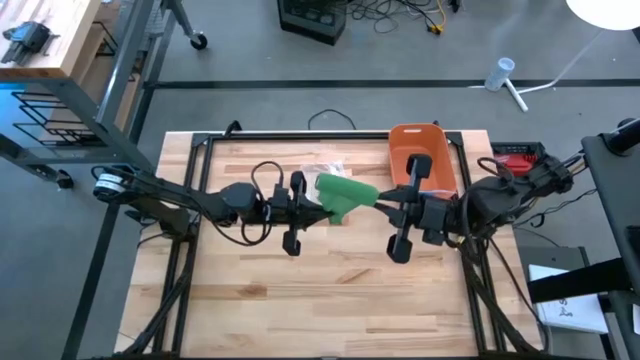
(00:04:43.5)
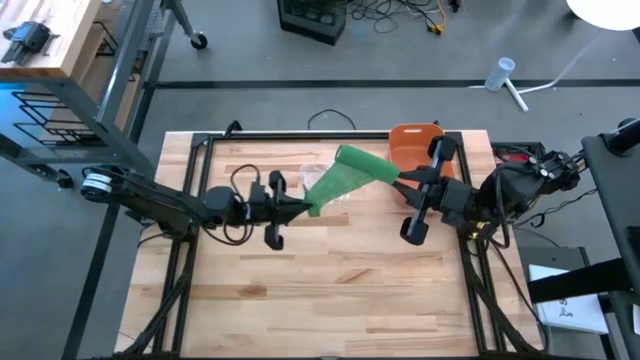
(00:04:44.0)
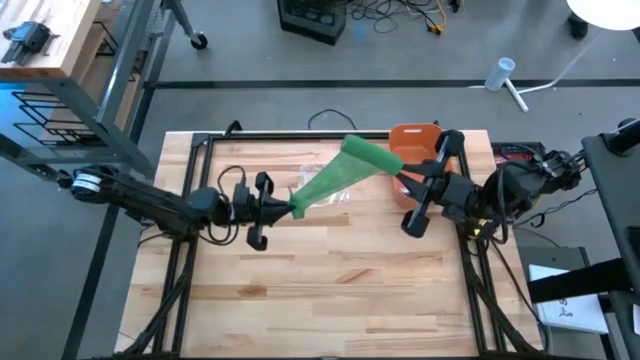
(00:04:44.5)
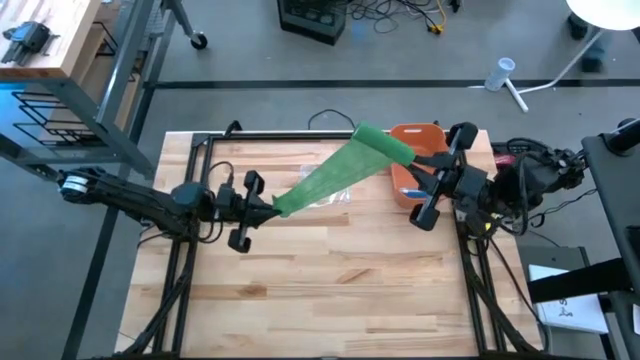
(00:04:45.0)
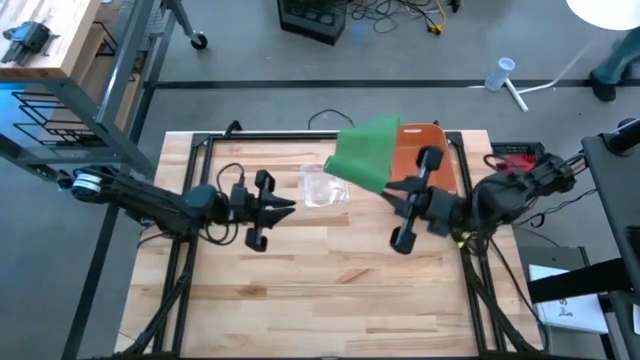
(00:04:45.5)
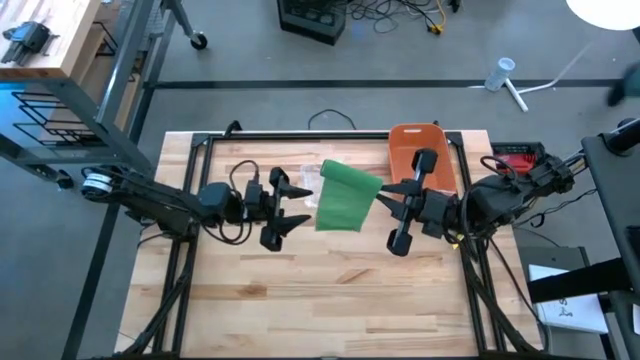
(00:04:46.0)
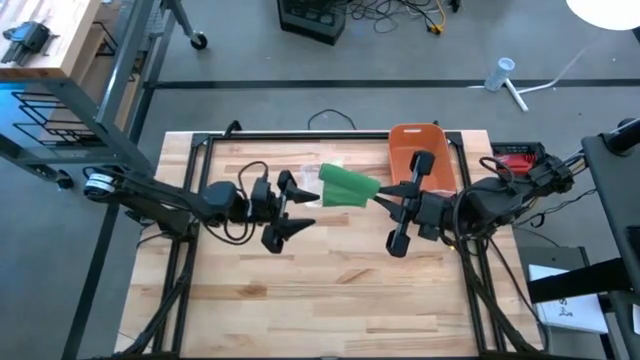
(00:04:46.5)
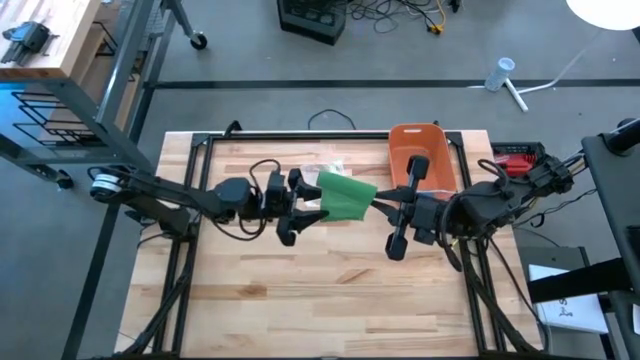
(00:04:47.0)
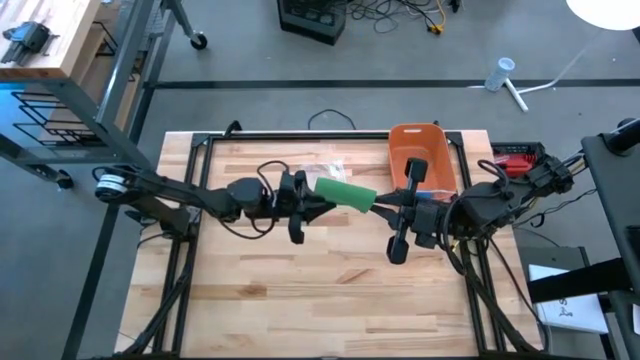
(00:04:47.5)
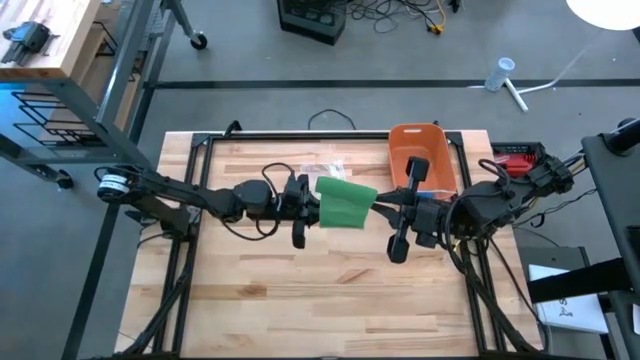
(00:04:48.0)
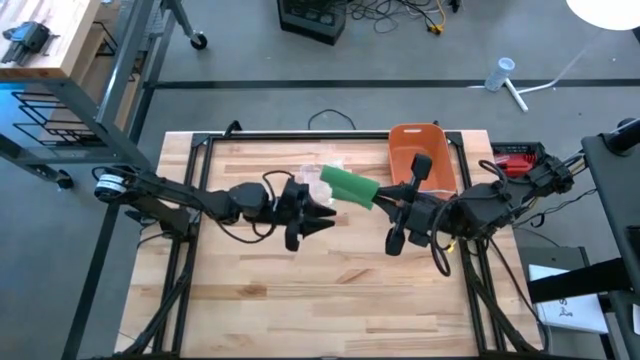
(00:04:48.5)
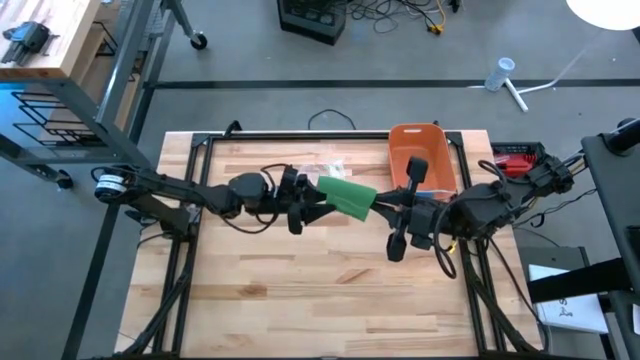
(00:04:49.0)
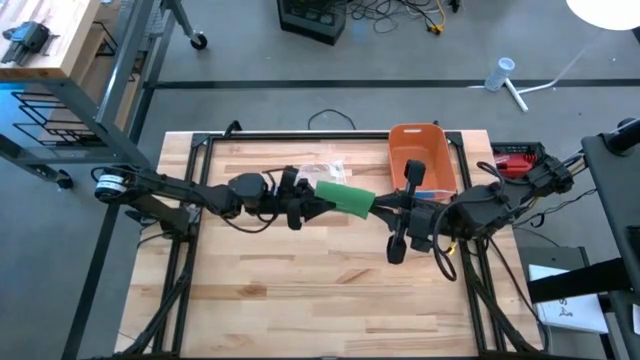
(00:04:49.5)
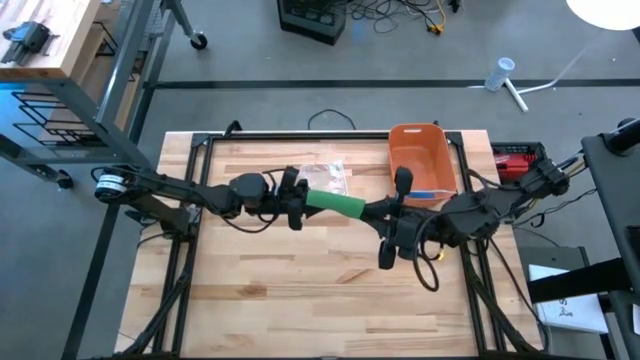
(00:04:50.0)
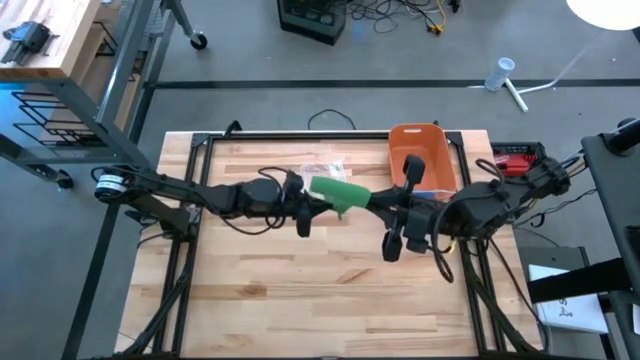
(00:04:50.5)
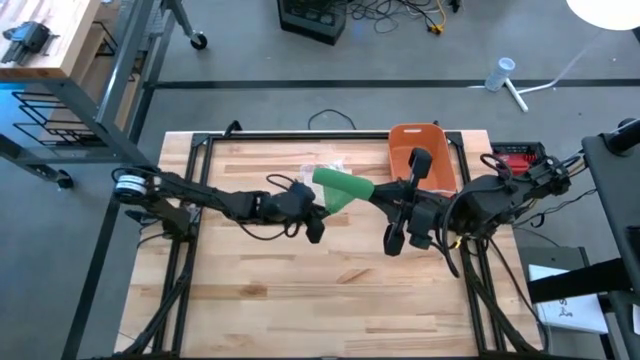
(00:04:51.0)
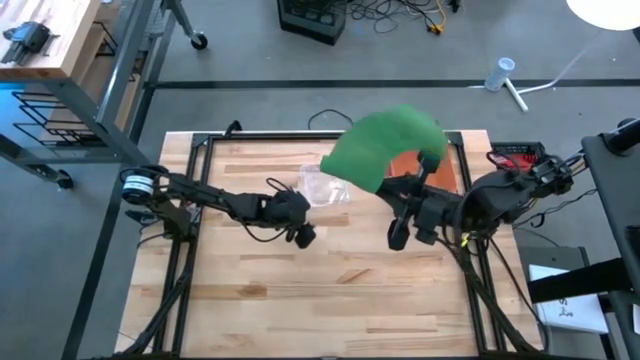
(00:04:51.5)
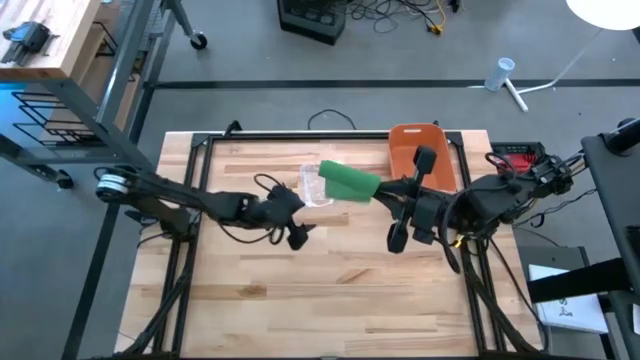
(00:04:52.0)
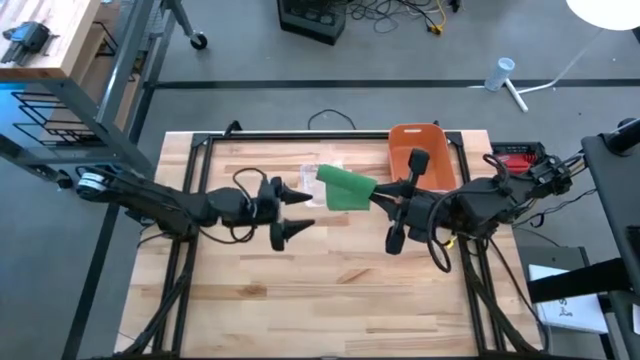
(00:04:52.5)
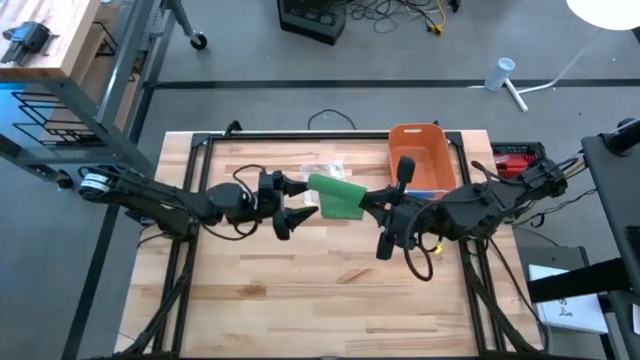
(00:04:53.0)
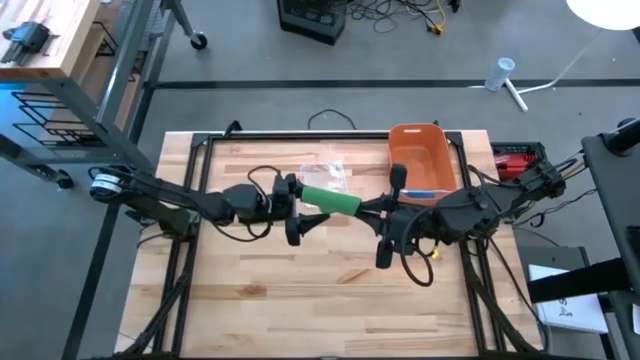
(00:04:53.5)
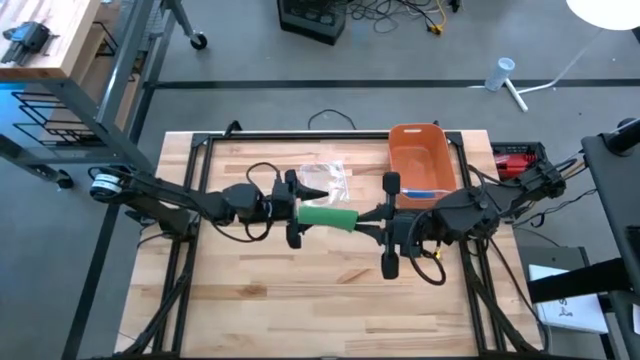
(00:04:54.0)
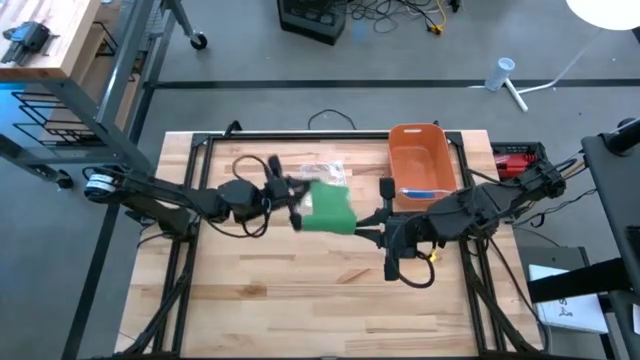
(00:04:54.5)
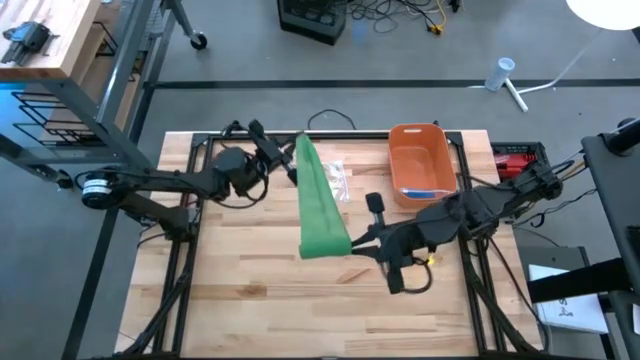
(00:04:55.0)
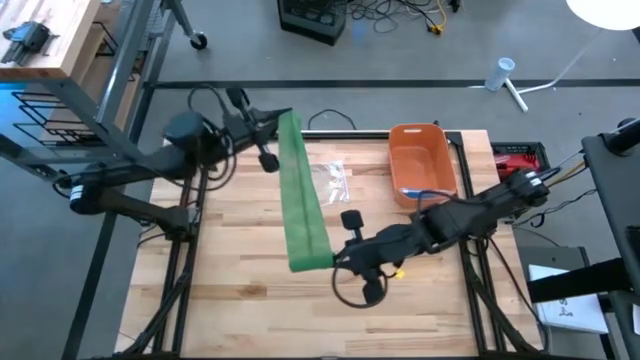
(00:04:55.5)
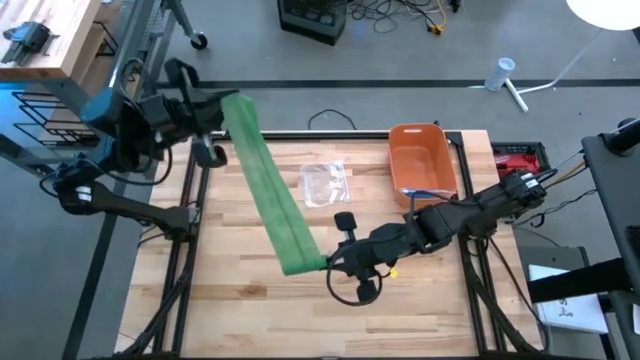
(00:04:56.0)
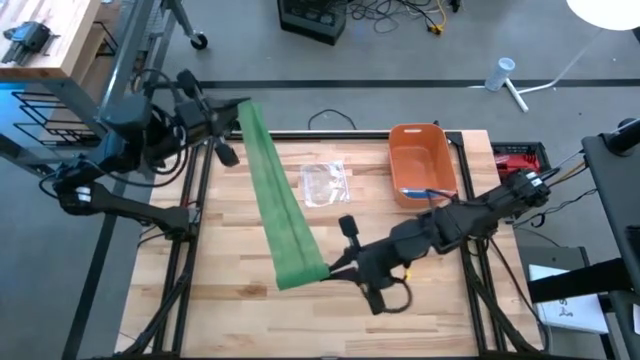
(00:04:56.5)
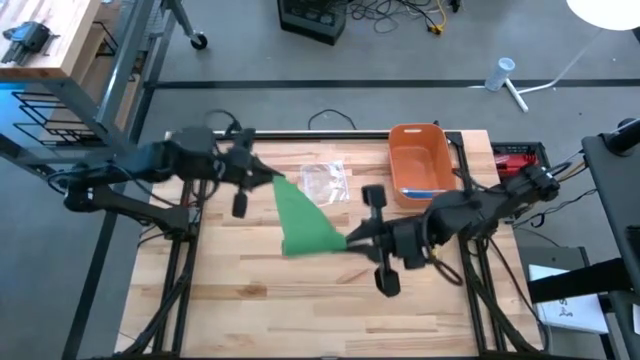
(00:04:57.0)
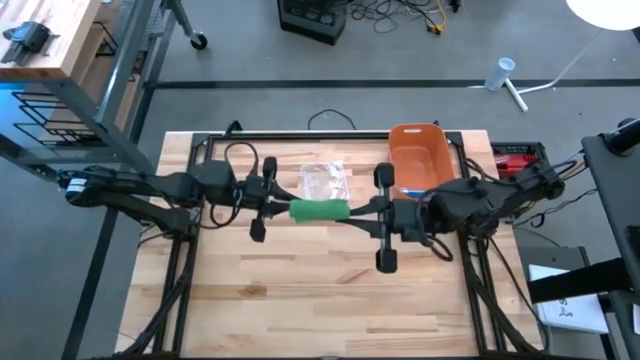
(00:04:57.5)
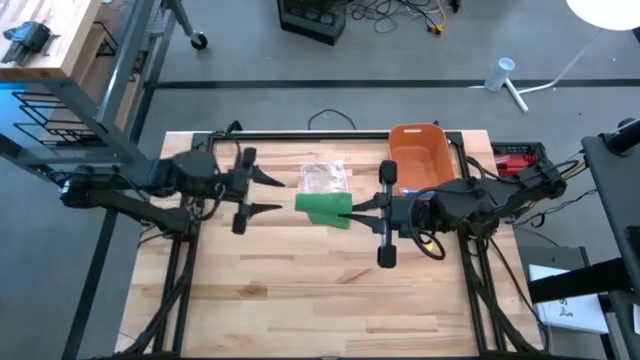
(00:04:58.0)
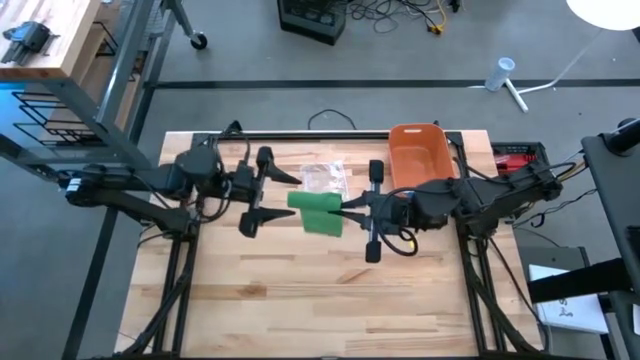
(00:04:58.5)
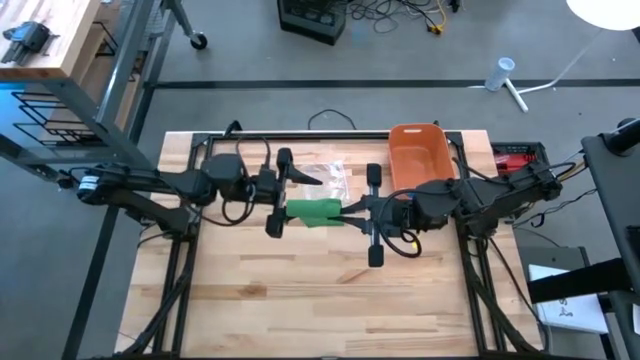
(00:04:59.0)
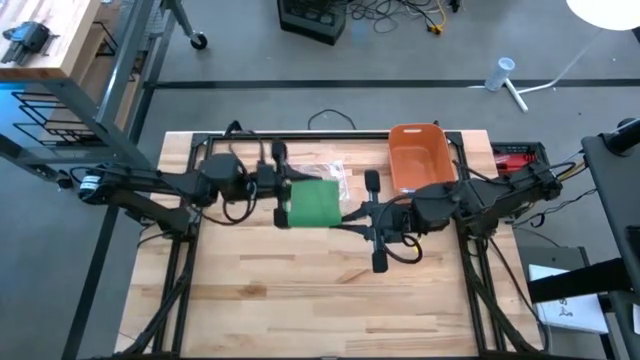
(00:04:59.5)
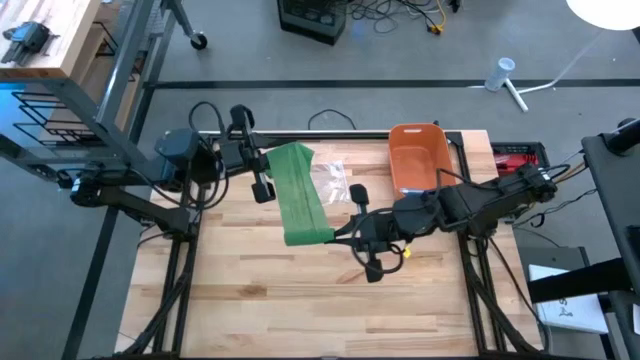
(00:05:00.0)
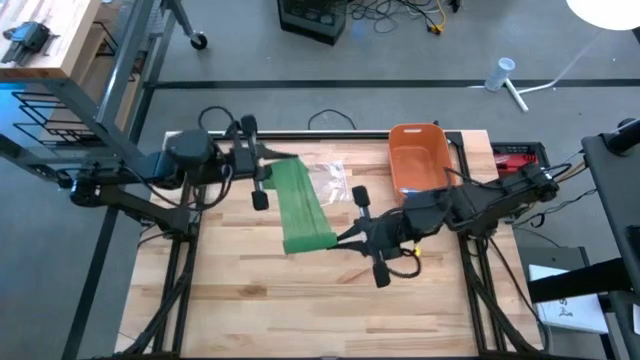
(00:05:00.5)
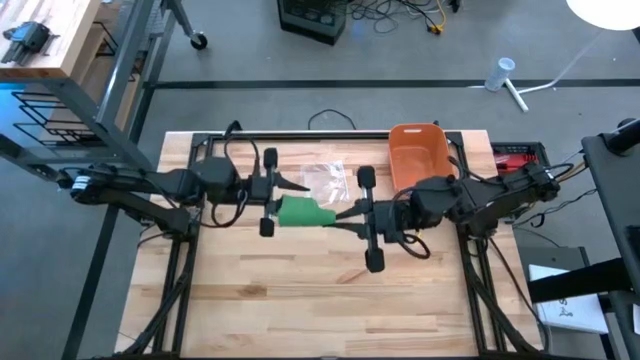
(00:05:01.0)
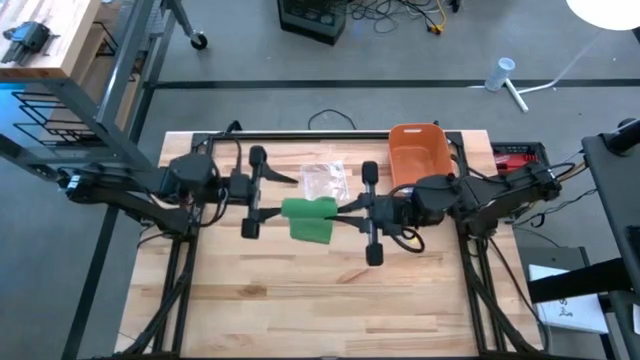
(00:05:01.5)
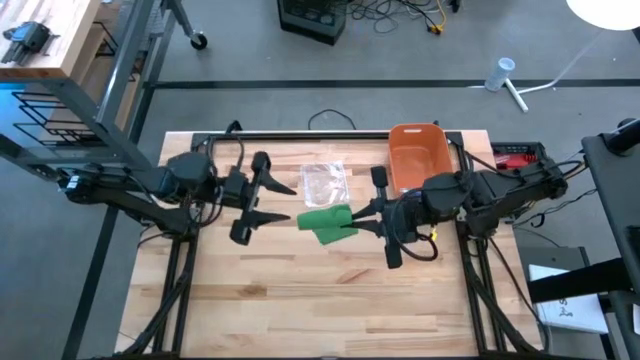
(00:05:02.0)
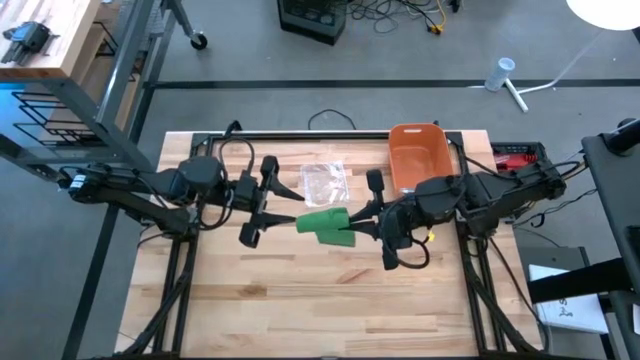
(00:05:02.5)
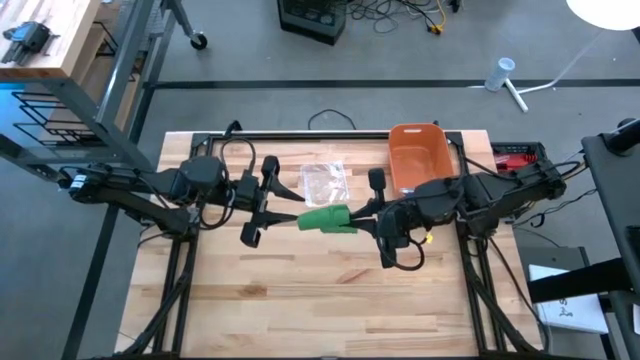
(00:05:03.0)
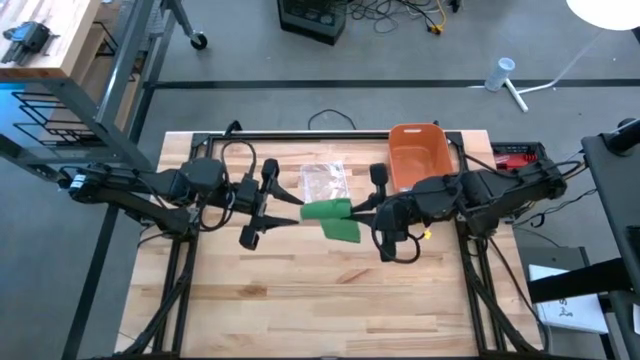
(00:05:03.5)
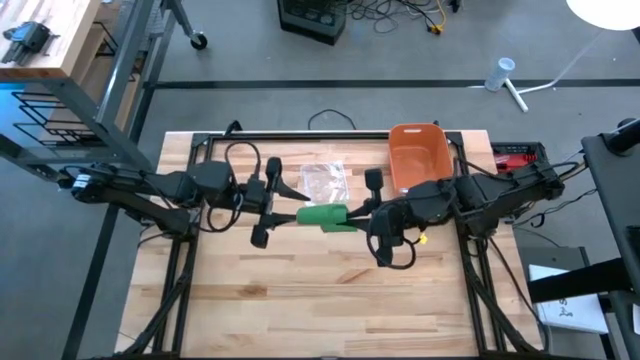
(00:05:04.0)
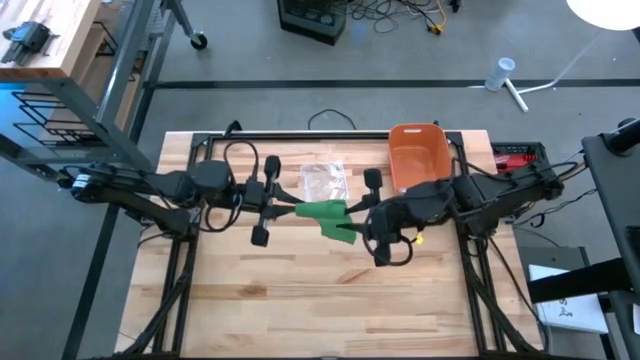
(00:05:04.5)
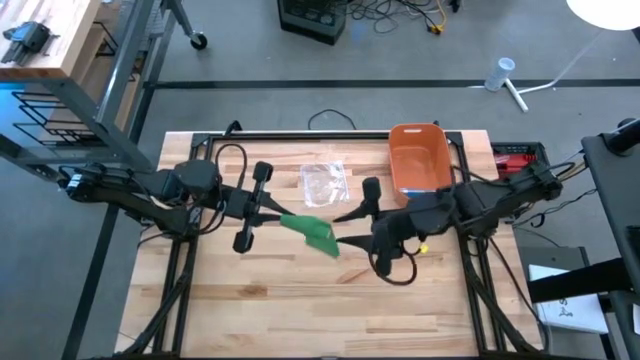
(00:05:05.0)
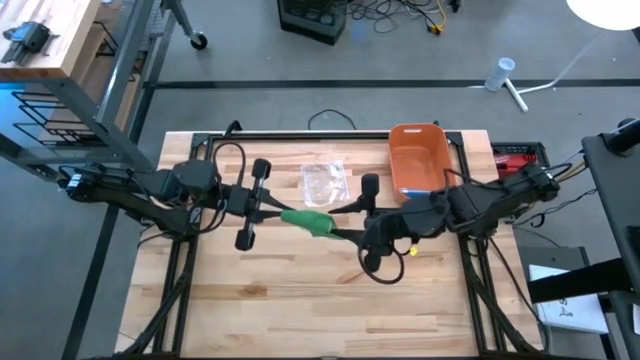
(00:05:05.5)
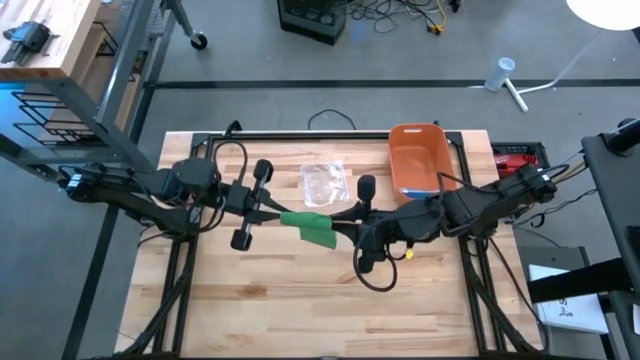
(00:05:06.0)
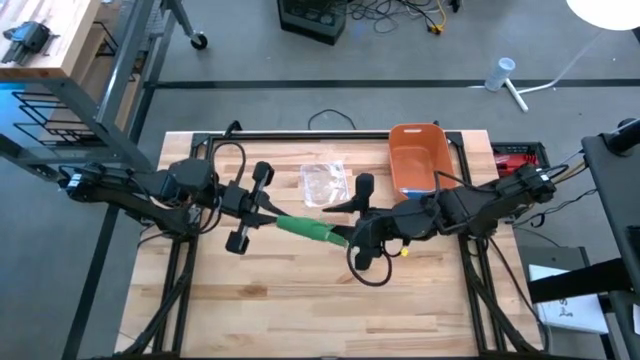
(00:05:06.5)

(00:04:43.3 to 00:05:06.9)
Task: Roll bandage
Roll the green bandage
